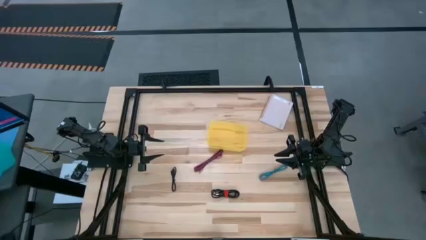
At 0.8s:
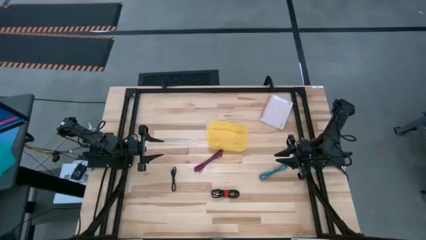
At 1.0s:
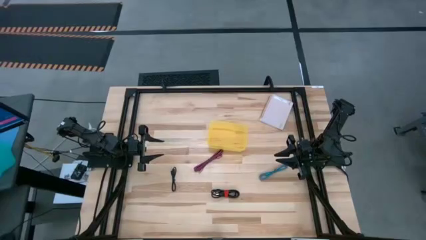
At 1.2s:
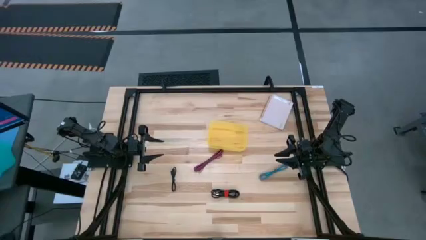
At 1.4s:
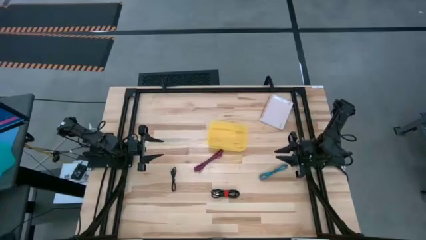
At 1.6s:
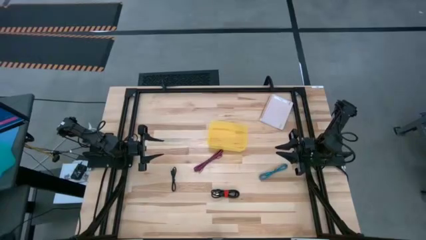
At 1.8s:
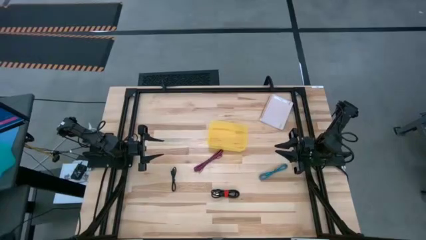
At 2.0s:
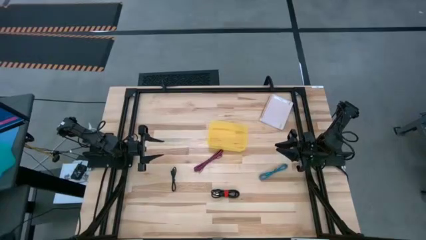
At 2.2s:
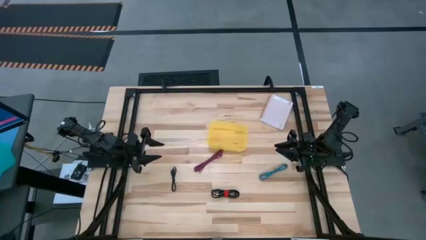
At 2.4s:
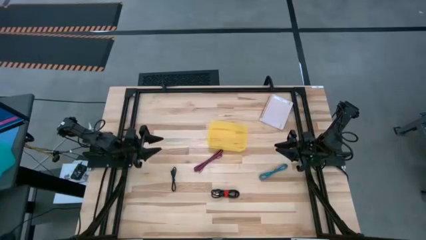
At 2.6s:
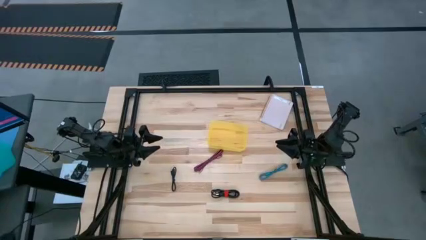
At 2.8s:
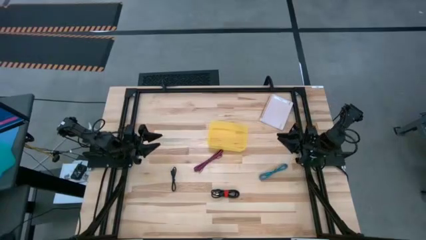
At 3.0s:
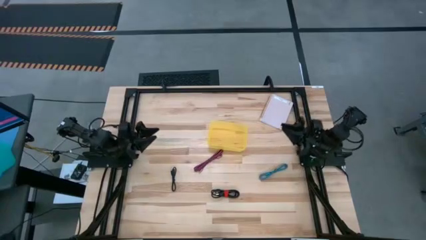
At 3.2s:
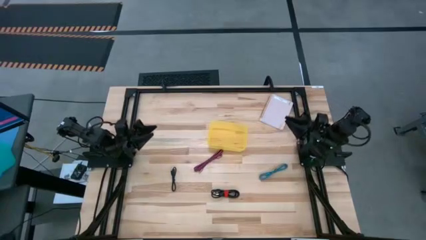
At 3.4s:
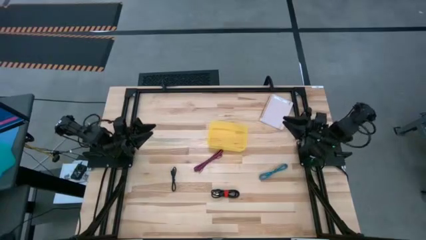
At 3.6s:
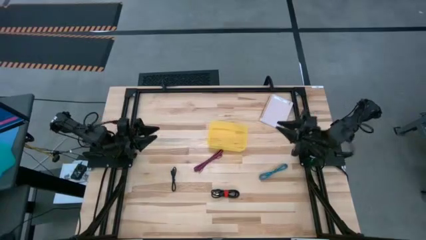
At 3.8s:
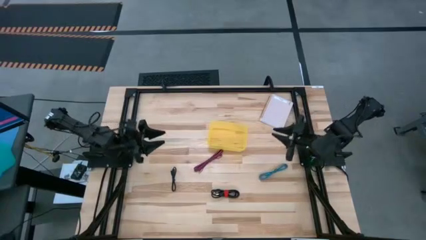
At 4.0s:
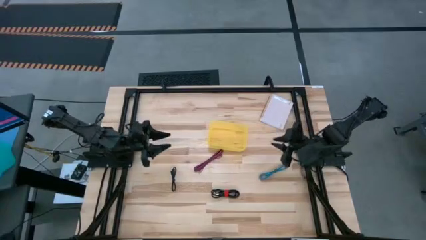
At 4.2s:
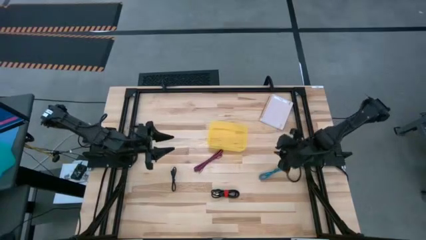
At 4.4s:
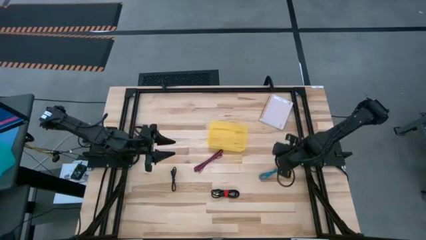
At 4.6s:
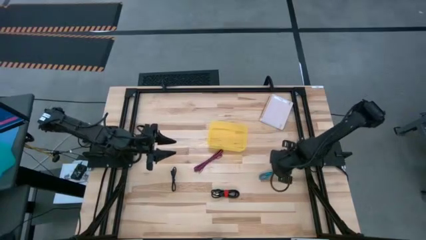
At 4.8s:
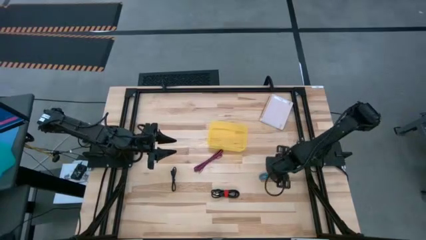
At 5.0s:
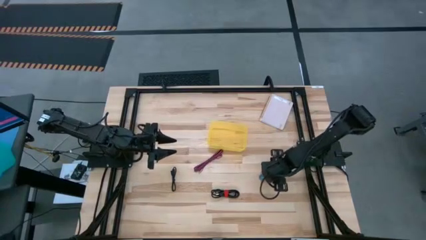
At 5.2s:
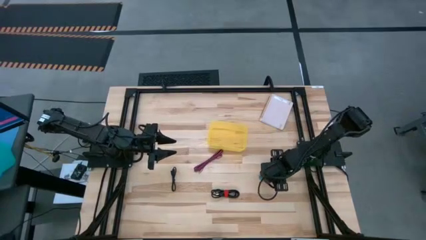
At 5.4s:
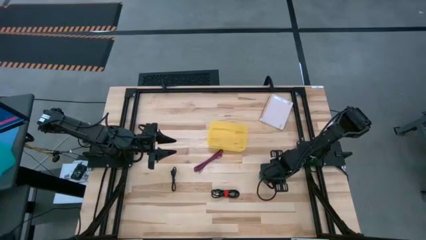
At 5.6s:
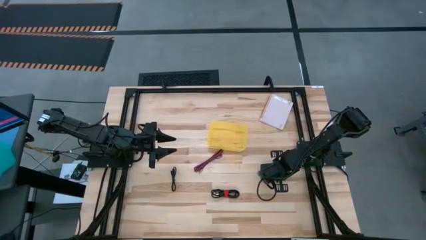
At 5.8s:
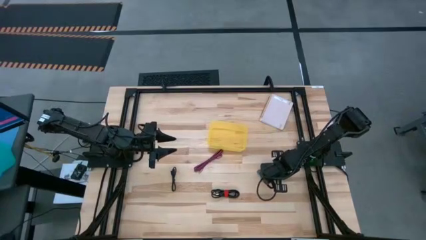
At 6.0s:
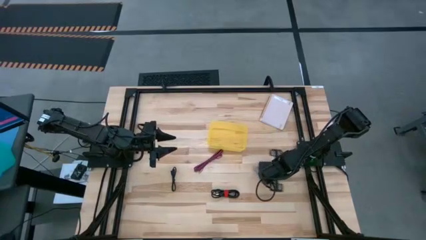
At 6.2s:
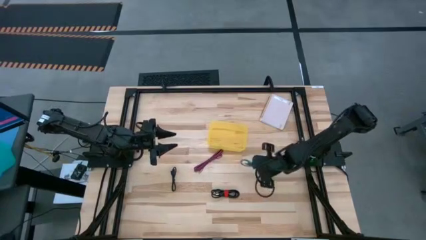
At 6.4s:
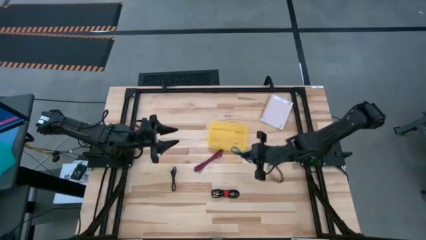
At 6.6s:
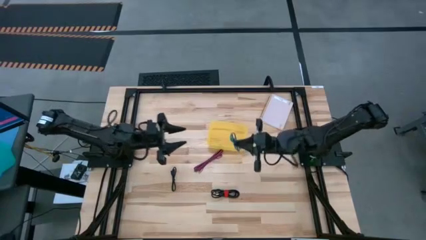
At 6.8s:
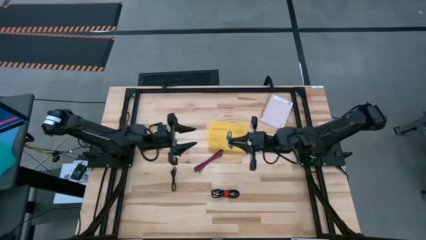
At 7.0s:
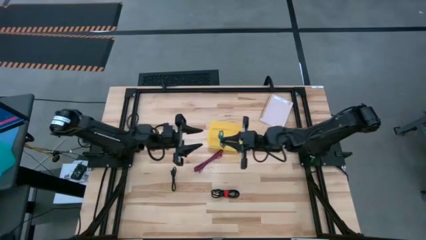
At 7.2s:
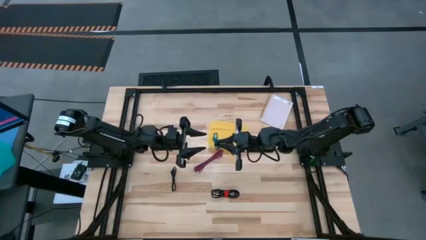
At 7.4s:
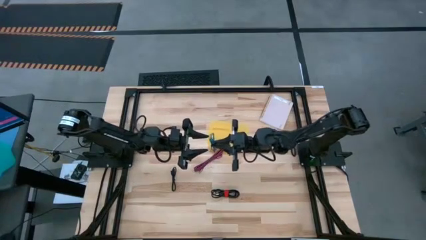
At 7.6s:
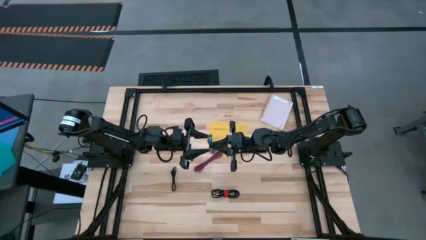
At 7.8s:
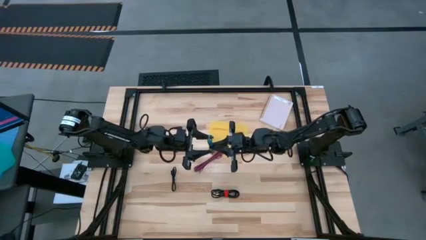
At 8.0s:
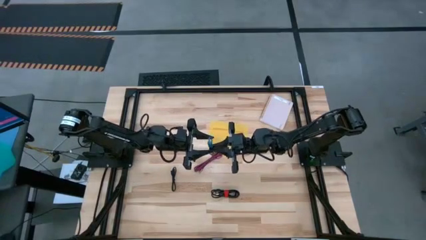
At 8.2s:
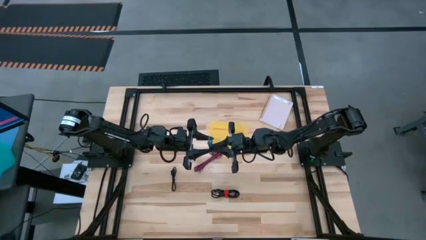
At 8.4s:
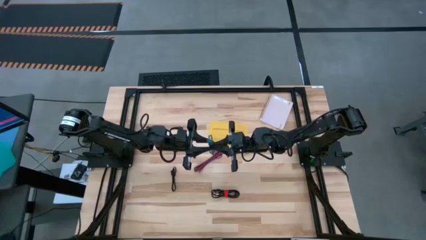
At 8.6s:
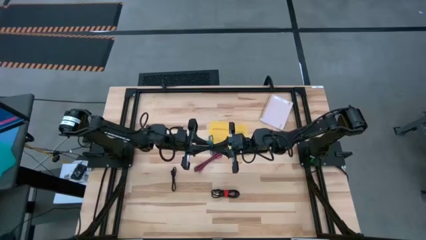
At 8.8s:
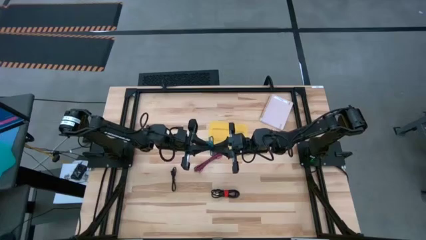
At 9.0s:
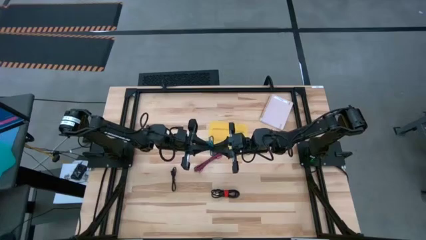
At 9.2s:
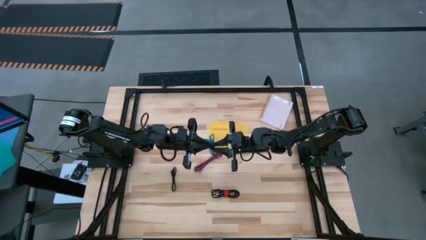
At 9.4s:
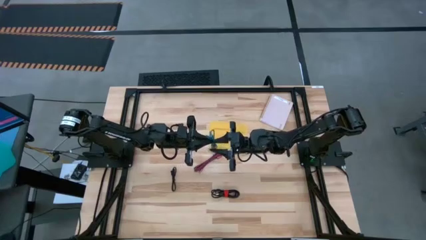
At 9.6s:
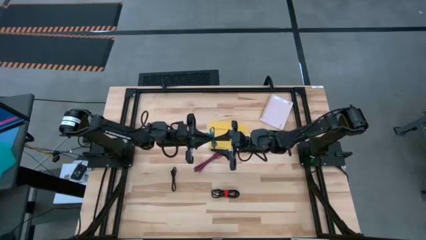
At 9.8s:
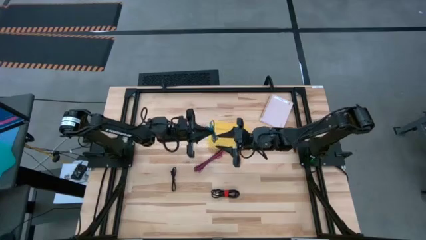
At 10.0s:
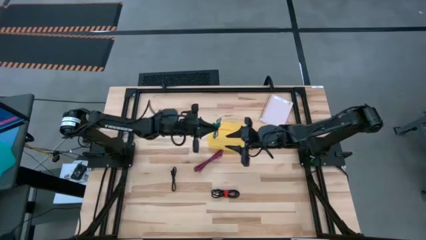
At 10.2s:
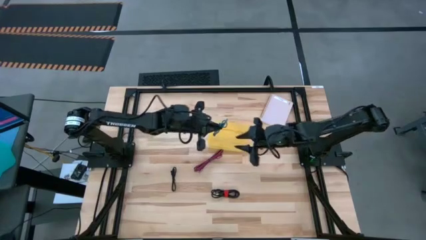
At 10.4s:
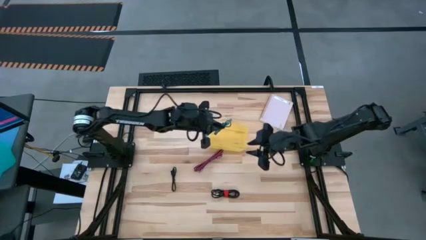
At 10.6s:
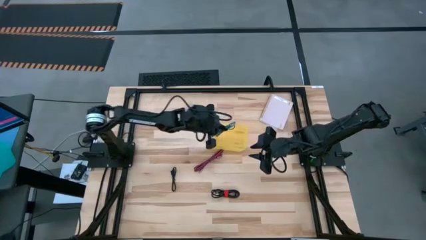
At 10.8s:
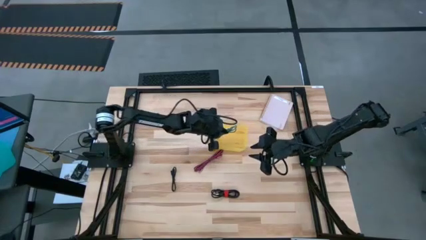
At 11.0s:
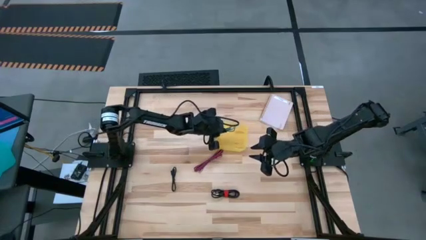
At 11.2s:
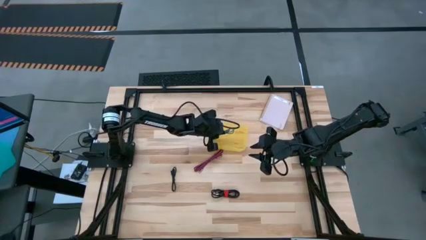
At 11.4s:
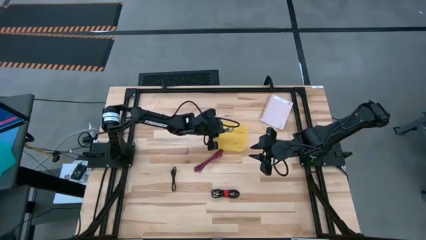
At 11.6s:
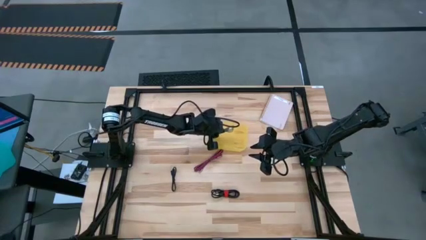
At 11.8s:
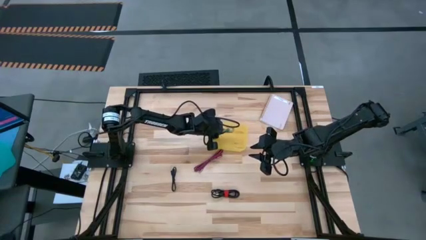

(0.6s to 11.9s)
Task: Pick and place USB-C Cables
Put the blue charger cable into the yellow bin
